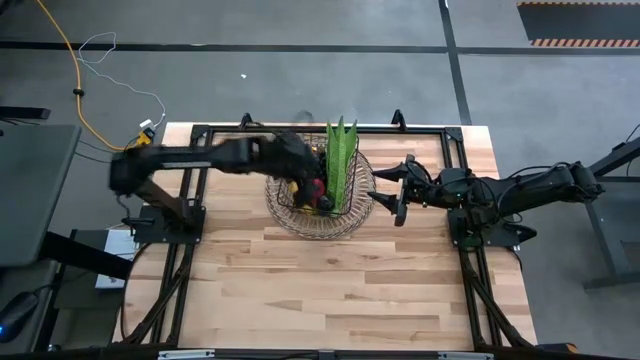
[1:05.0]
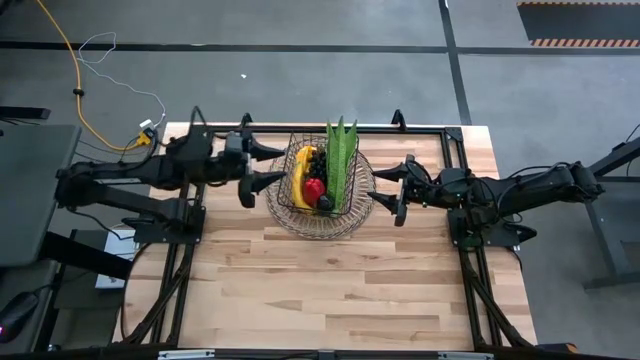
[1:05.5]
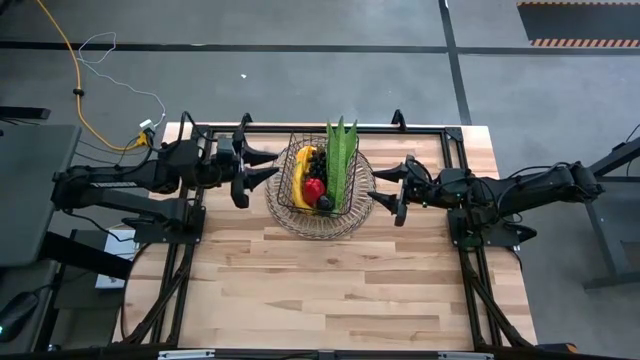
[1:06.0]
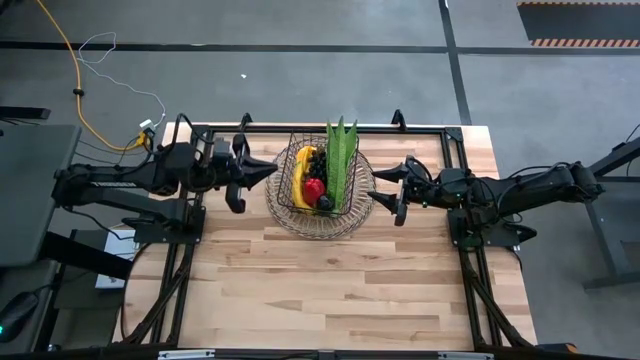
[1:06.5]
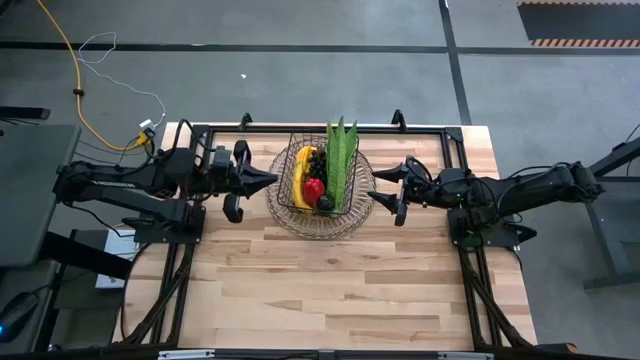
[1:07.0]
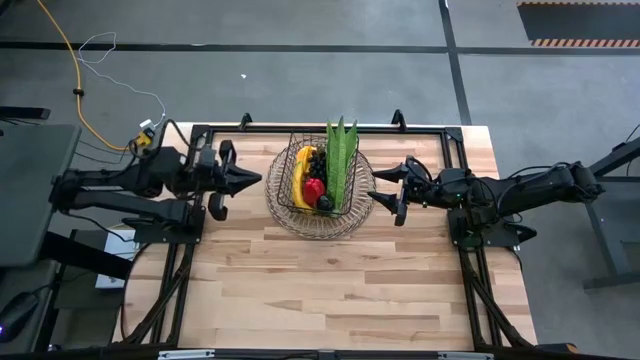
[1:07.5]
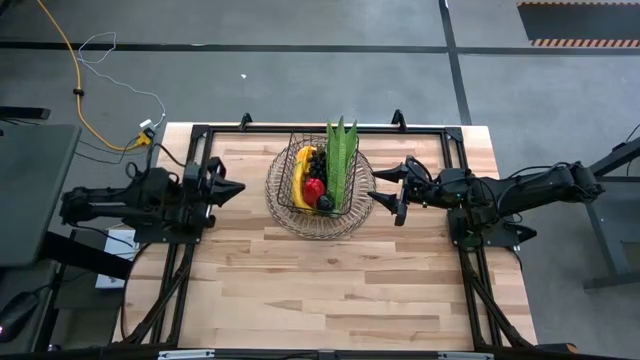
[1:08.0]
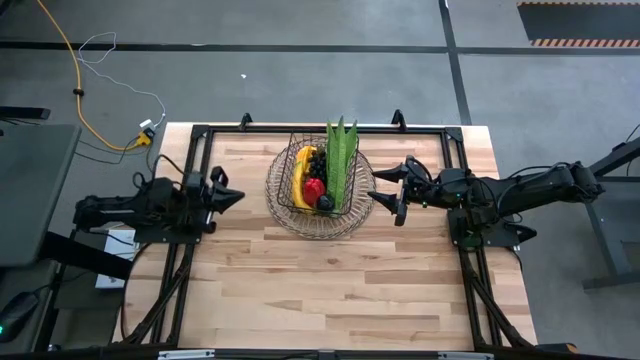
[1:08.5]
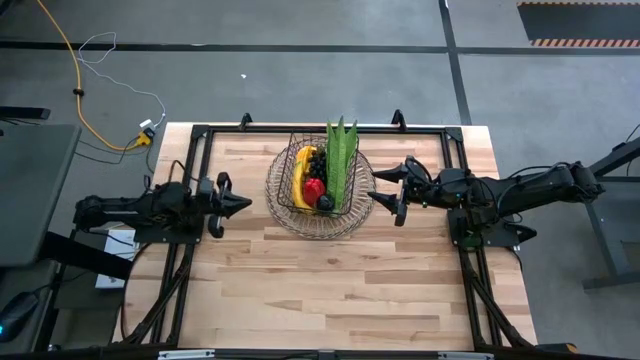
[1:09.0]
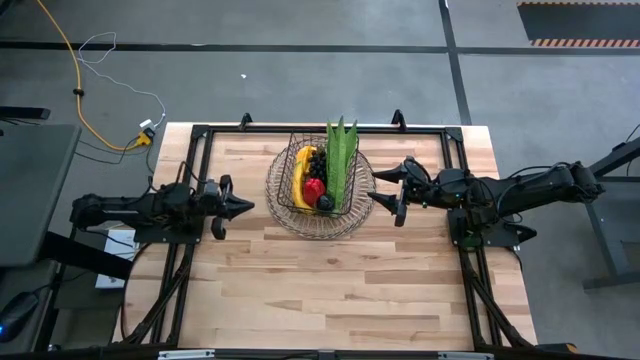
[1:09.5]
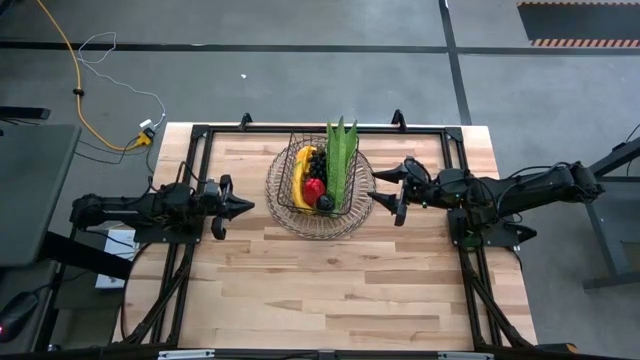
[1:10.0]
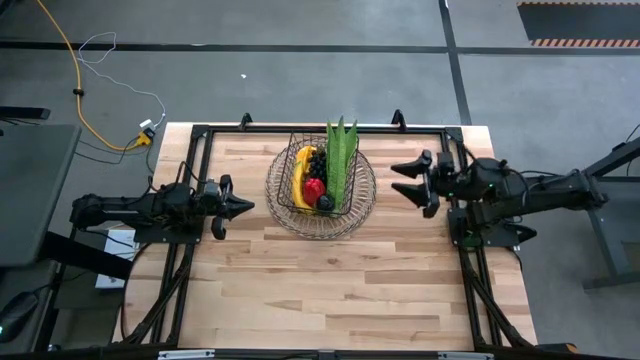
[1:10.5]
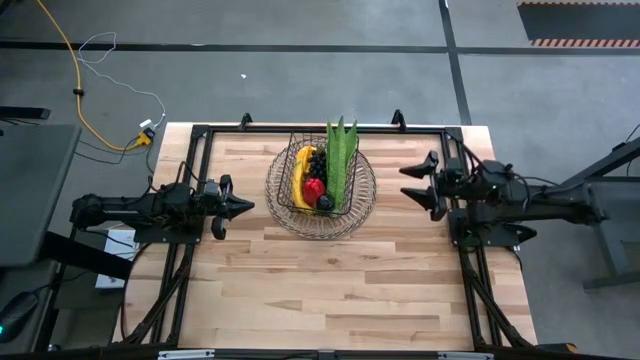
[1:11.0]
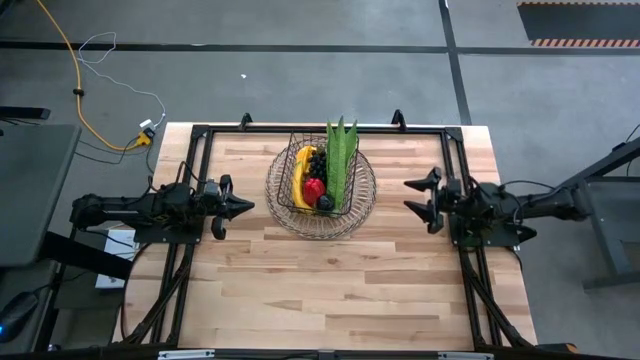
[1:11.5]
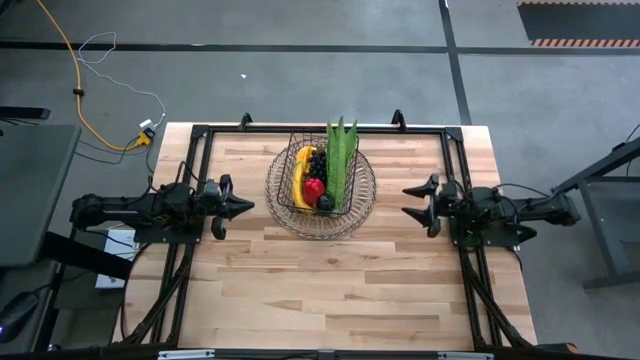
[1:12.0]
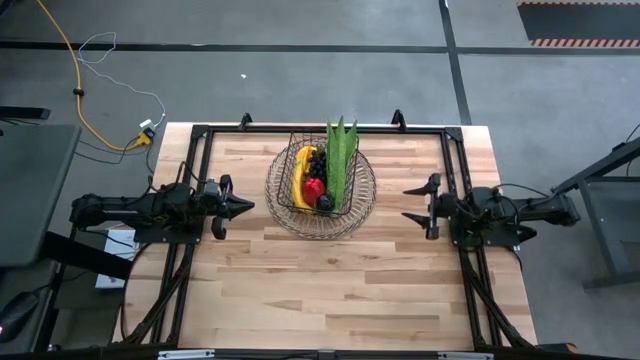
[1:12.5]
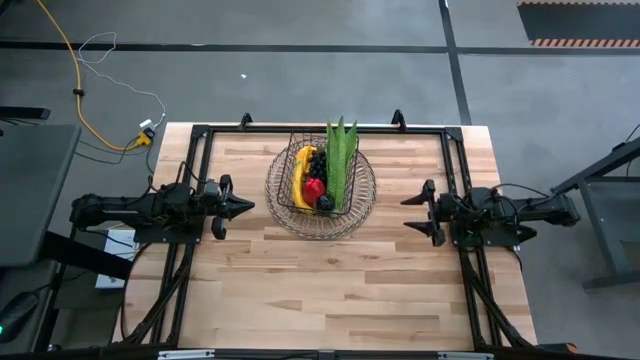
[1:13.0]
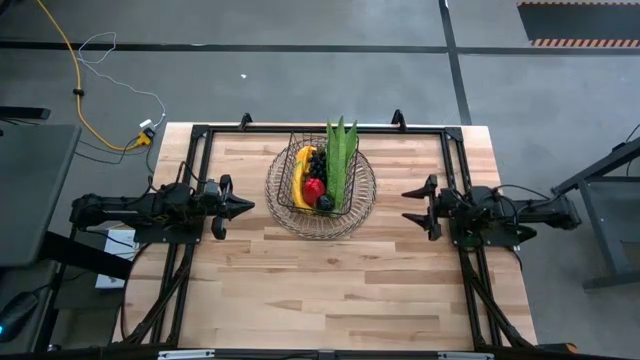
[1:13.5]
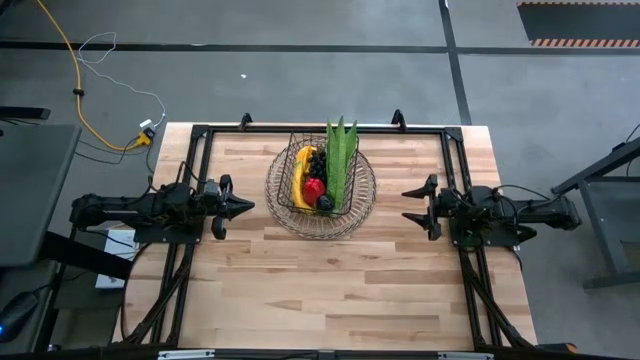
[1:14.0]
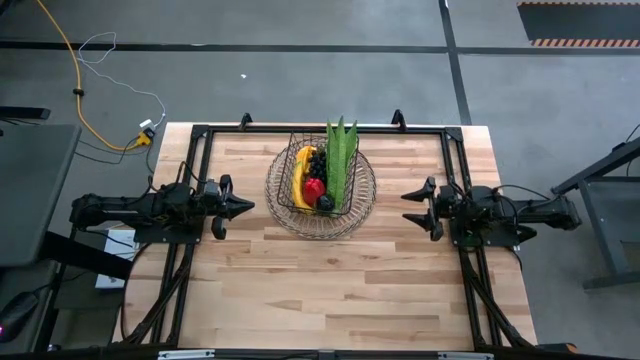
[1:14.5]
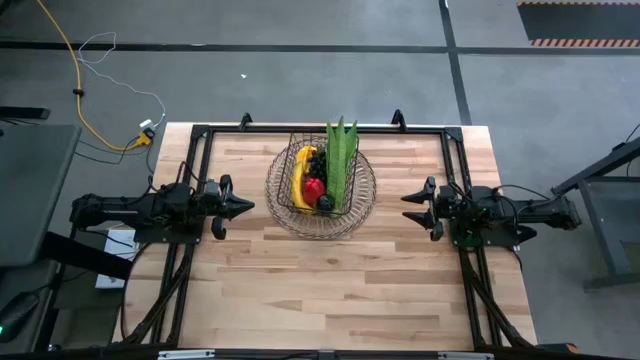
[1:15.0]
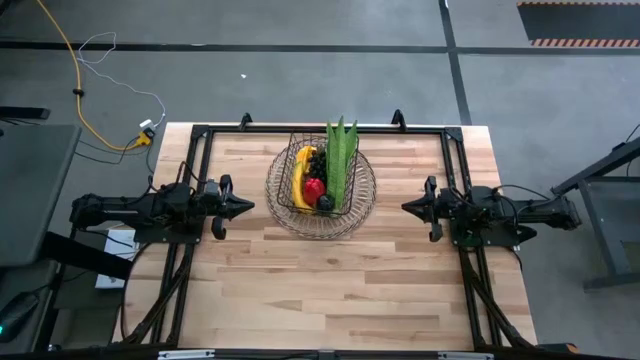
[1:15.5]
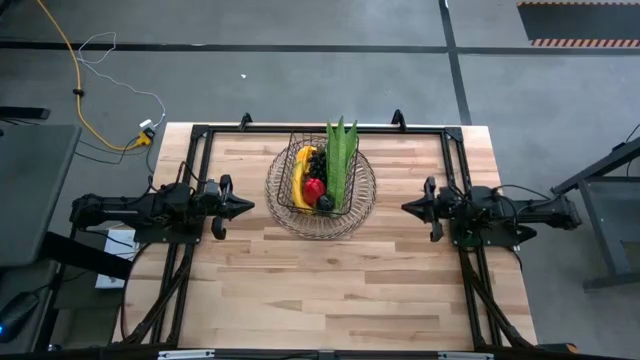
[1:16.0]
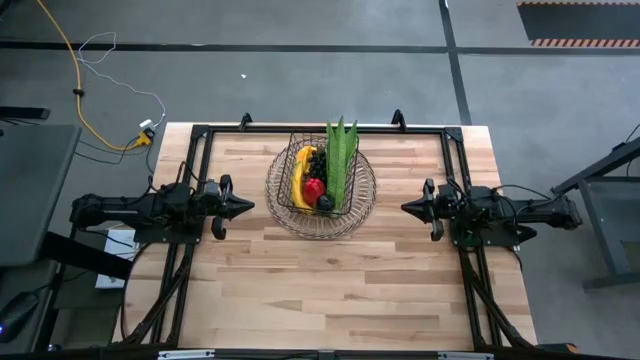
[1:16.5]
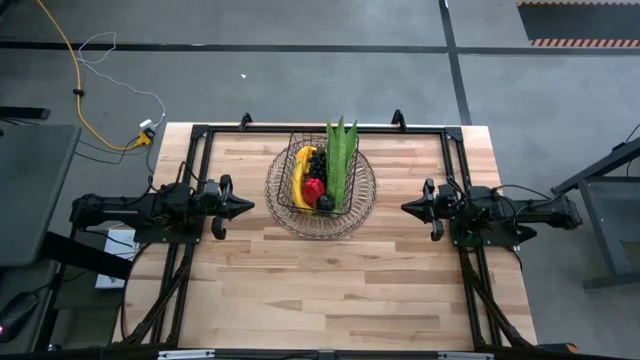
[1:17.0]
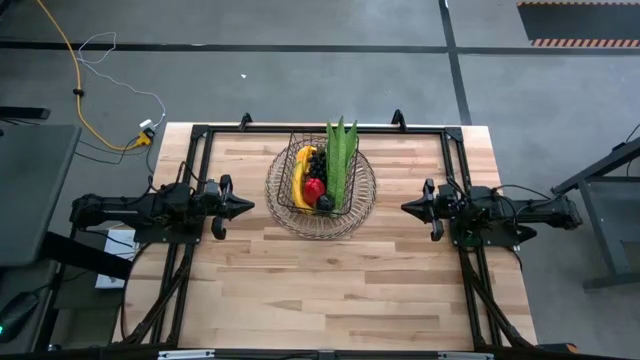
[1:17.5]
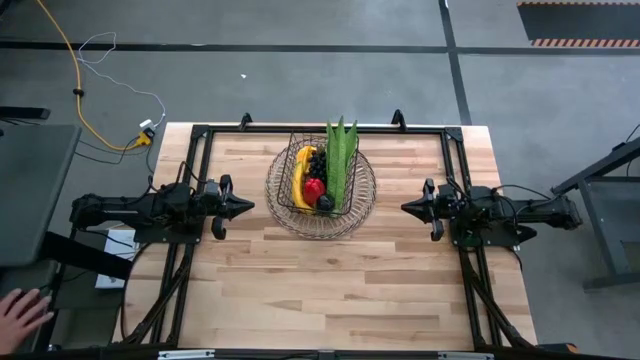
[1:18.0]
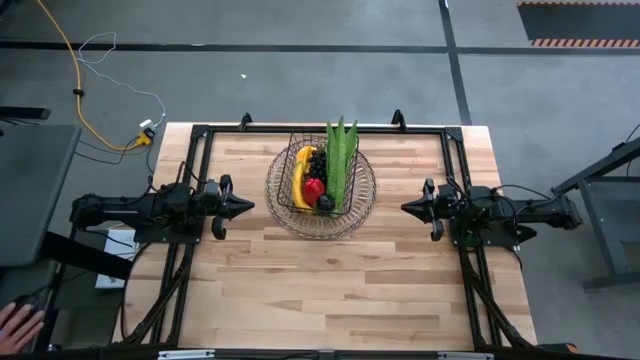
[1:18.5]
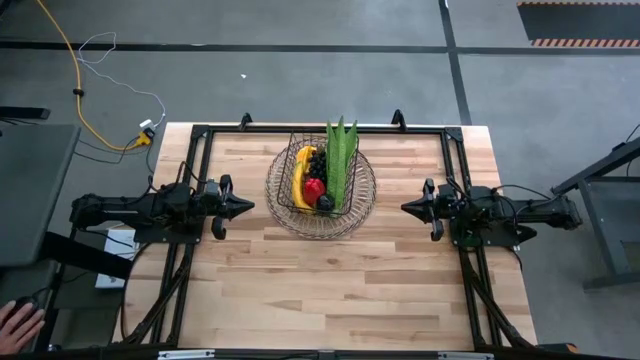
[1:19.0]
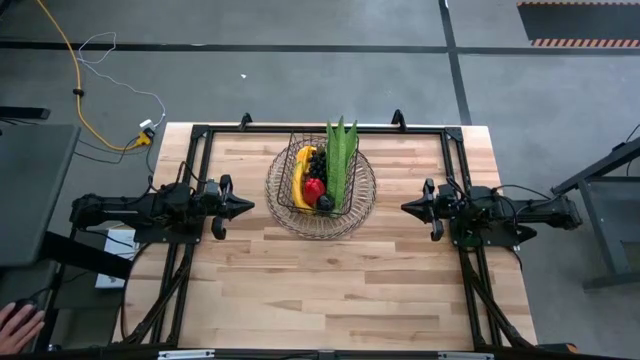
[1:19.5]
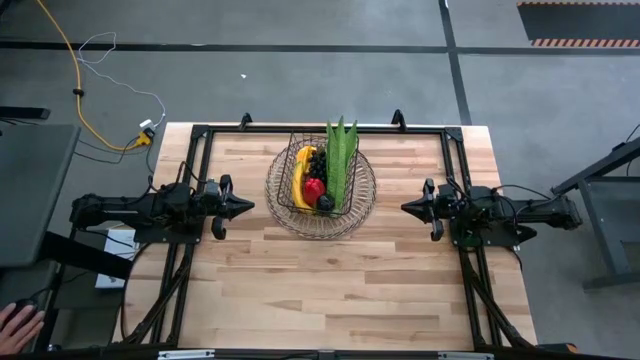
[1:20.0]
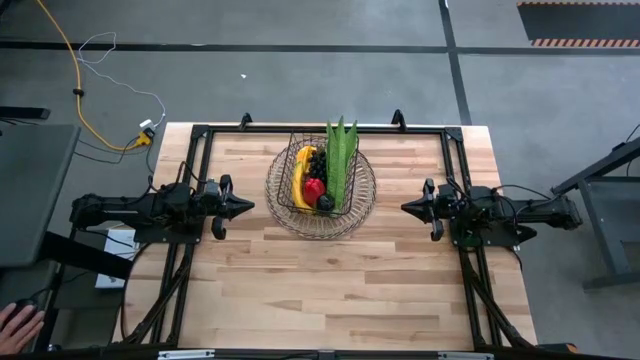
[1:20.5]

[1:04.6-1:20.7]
Task: Build produce basket
Return to Home Position

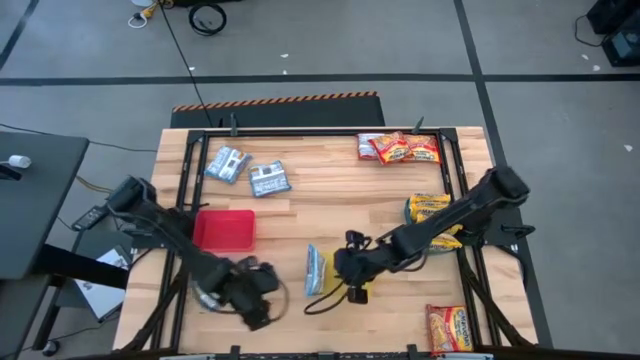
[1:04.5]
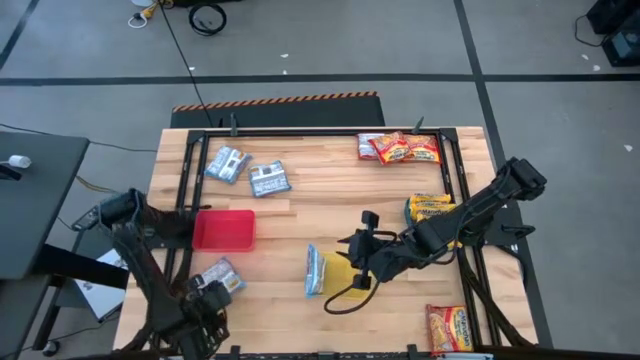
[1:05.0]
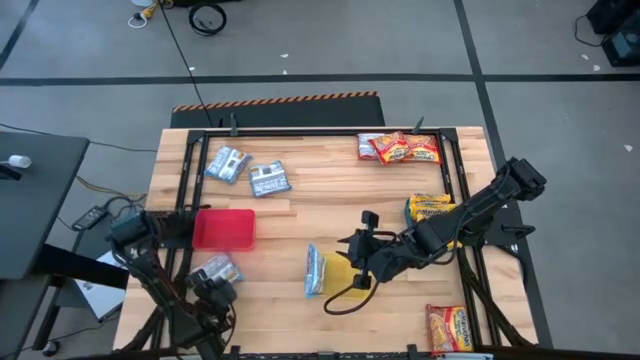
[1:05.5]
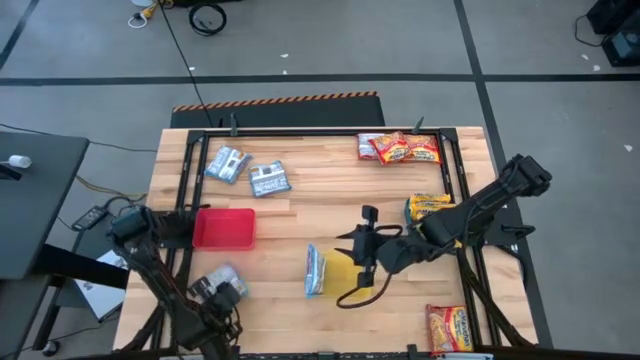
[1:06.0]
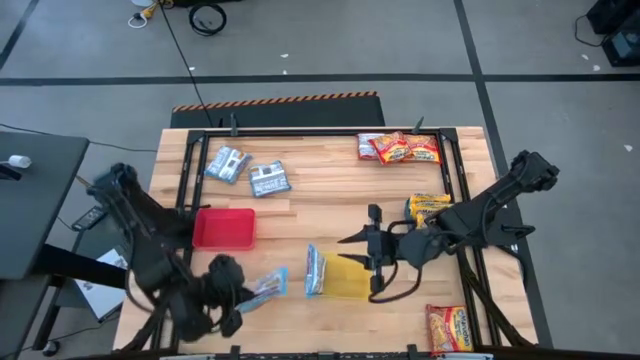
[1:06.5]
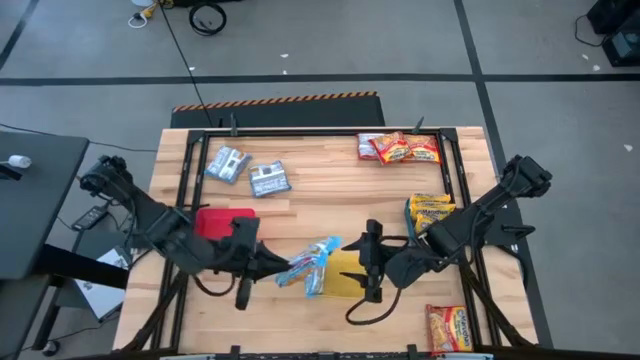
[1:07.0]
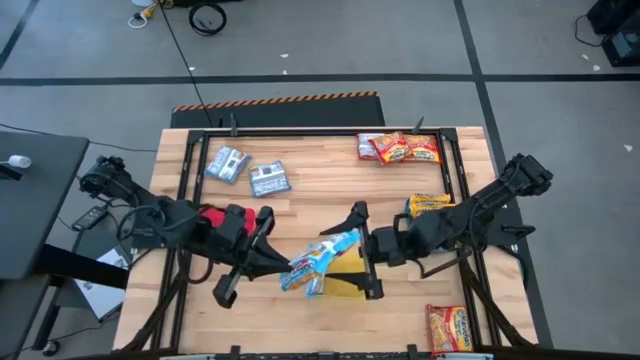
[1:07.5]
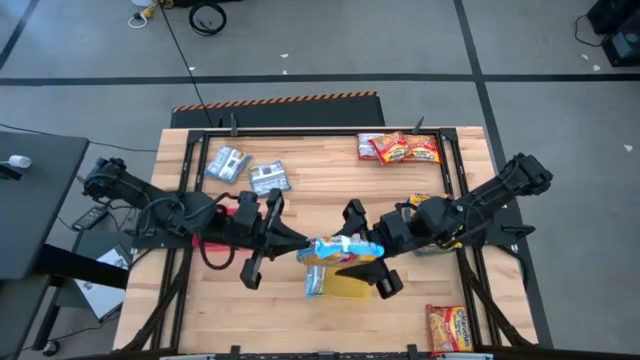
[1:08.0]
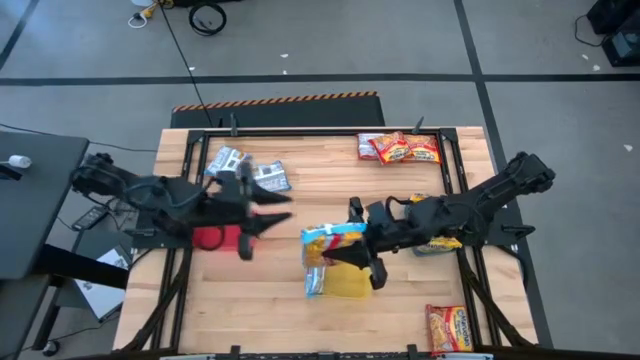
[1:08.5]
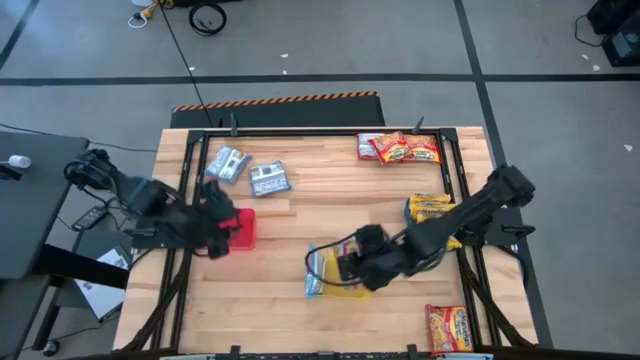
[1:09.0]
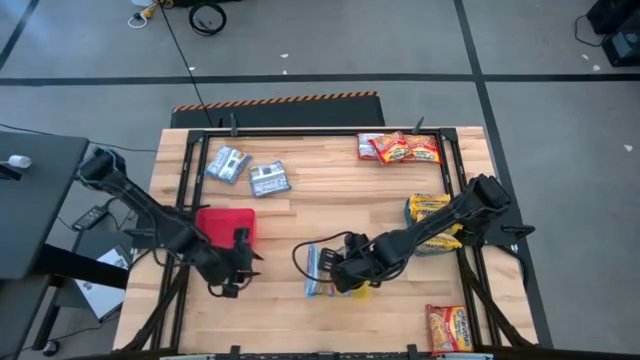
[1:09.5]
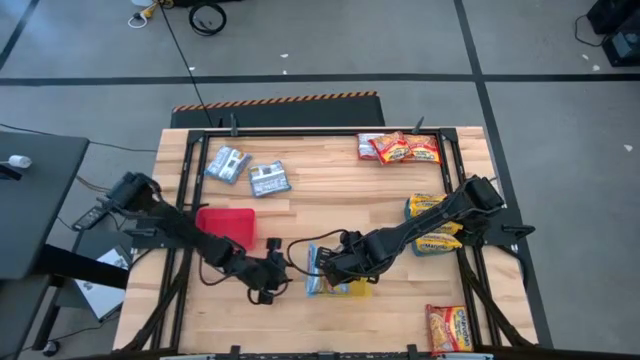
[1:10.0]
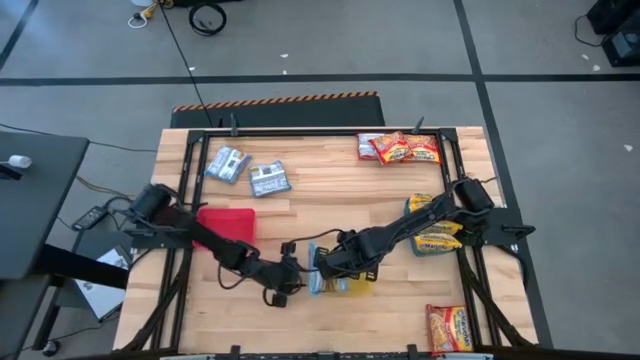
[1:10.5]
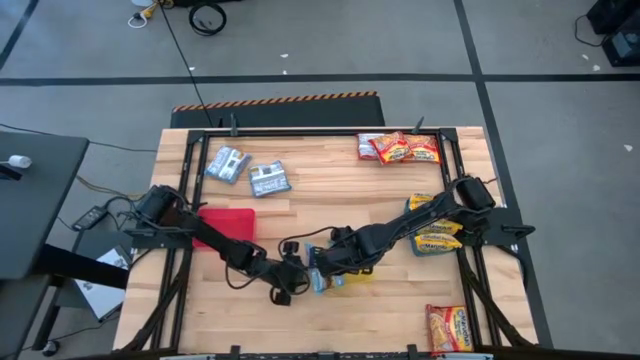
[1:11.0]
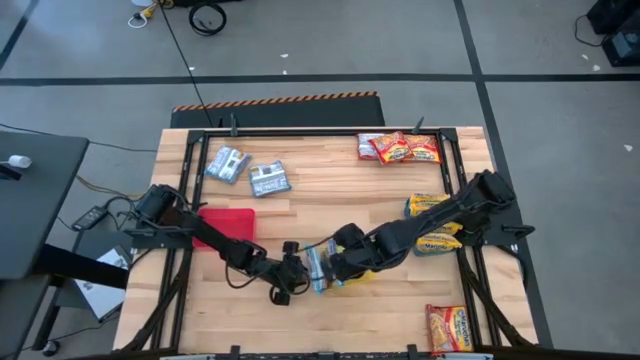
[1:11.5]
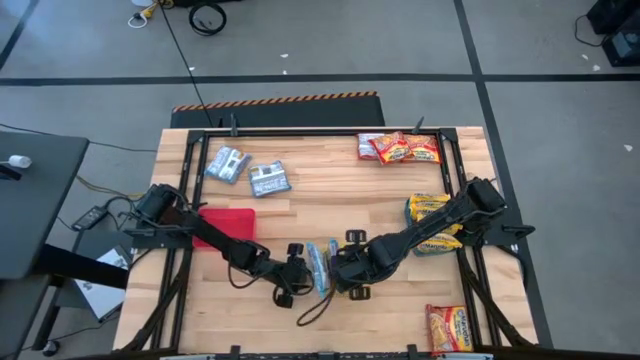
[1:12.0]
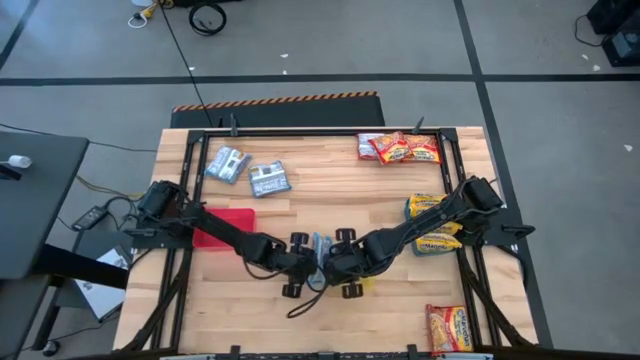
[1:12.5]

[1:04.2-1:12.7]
Task: Sort Maruchan noodles
Put the light blue noodle pack into the yellow bin
